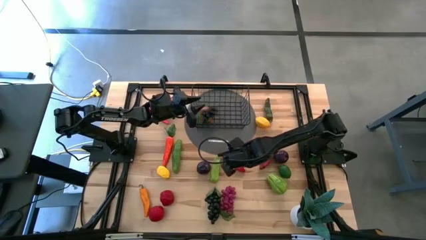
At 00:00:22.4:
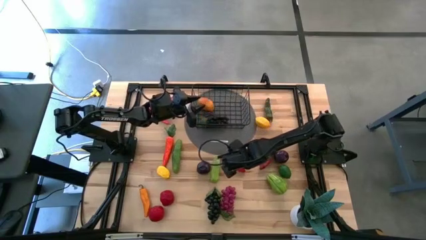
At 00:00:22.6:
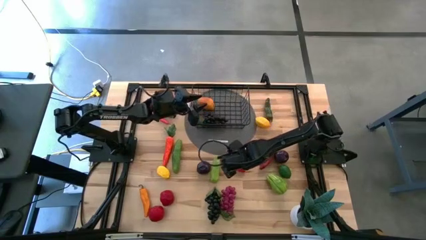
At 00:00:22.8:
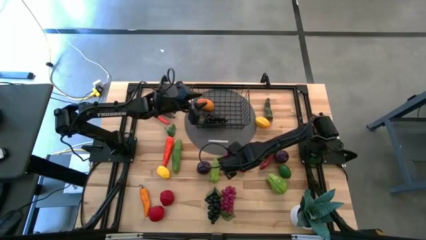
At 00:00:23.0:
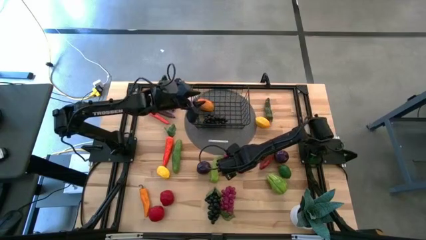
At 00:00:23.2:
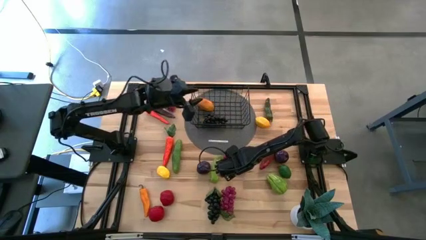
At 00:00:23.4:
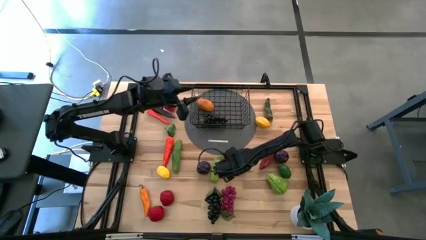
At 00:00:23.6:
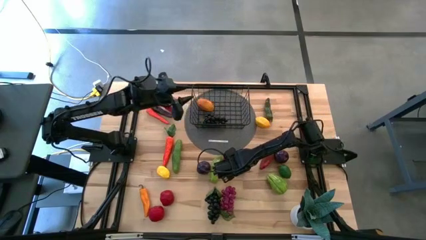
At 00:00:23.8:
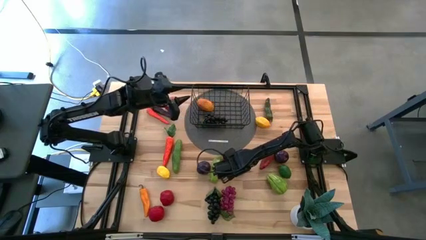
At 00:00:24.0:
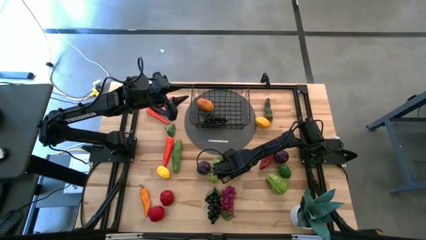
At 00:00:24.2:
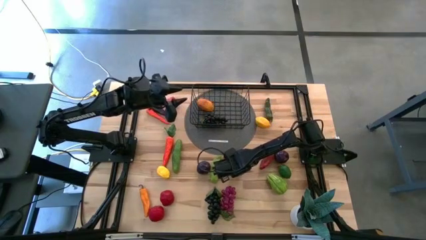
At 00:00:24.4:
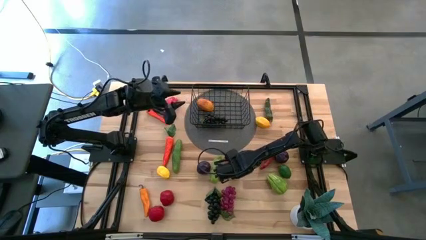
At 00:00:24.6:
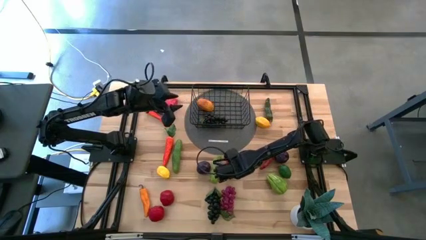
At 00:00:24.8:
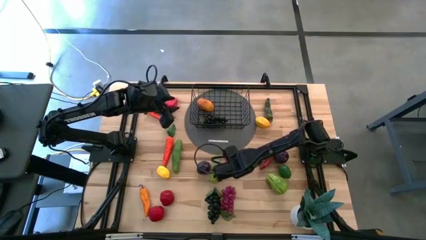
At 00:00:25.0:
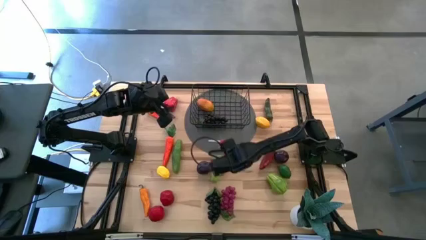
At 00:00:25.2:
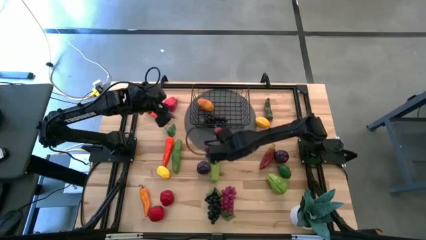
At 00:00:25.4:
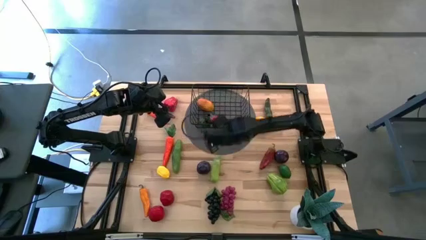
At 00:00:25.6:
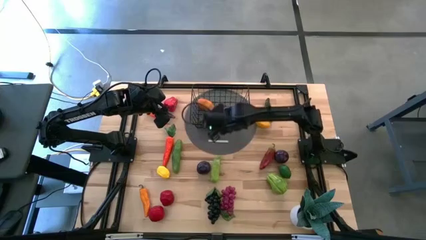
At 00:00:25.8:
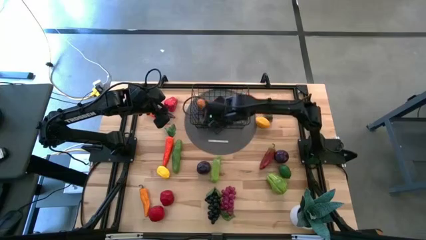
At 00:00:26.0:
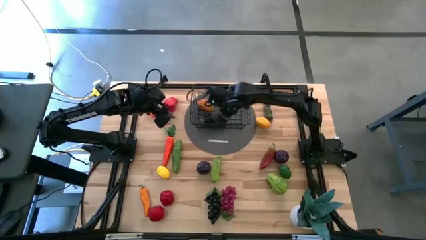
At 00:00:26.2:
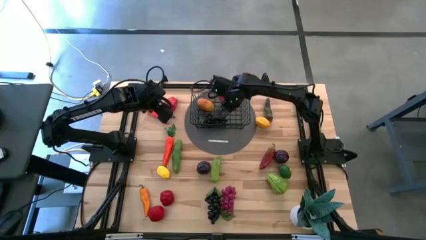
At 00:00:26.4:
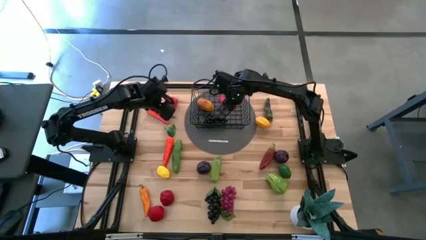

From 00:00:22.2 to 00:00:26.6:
Task: Build produce basket
Put the red chili pepper into the black wire basket

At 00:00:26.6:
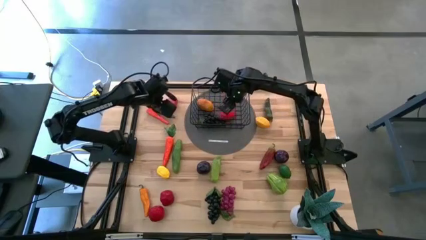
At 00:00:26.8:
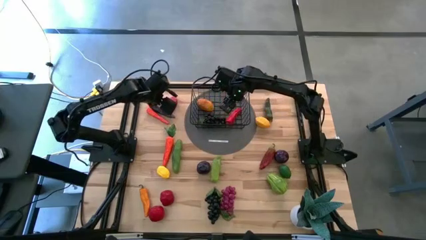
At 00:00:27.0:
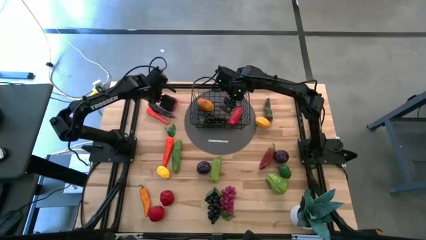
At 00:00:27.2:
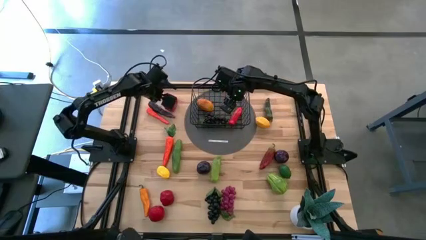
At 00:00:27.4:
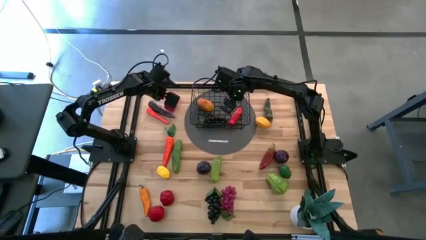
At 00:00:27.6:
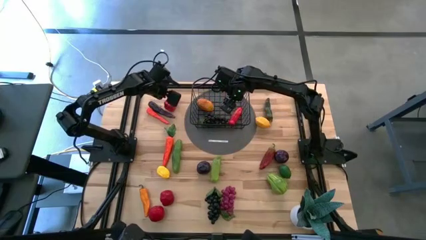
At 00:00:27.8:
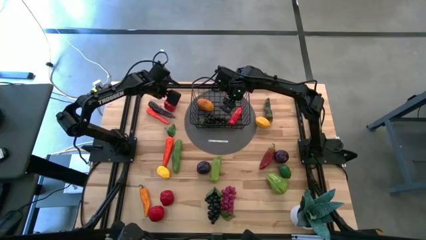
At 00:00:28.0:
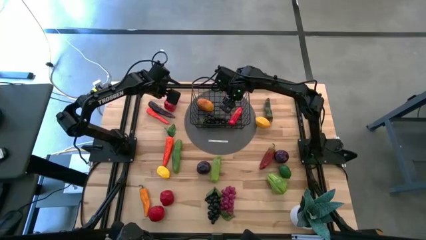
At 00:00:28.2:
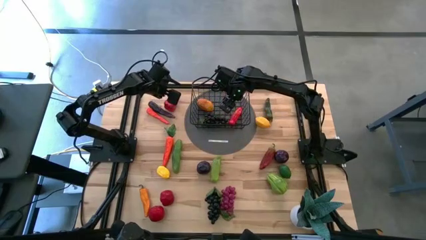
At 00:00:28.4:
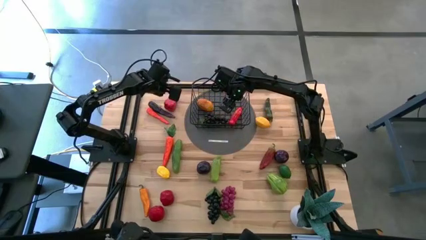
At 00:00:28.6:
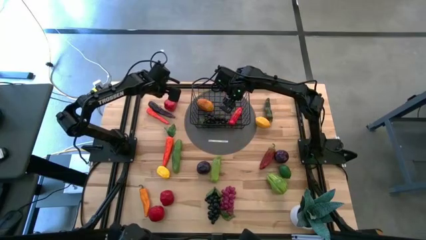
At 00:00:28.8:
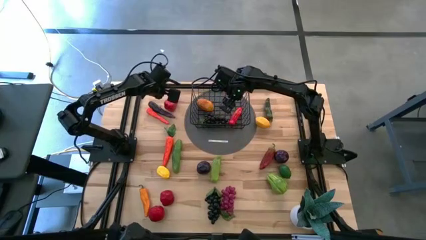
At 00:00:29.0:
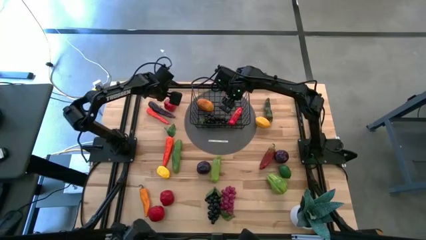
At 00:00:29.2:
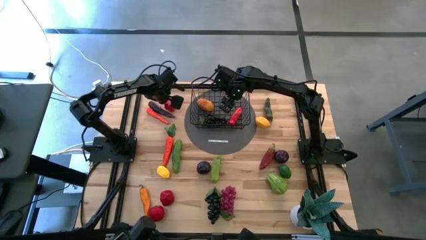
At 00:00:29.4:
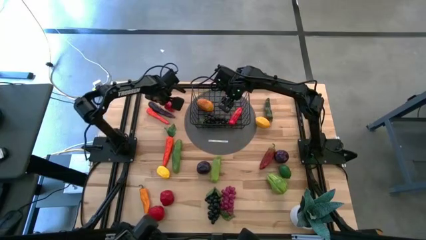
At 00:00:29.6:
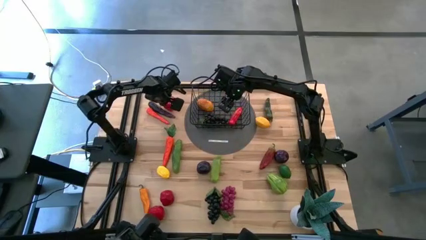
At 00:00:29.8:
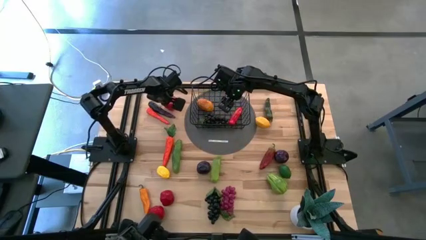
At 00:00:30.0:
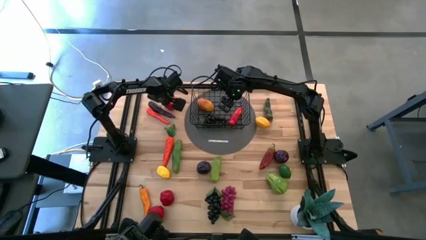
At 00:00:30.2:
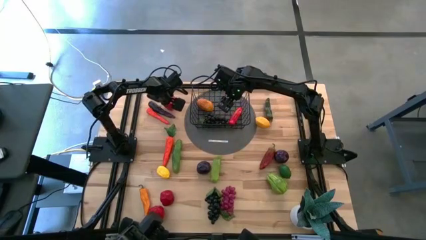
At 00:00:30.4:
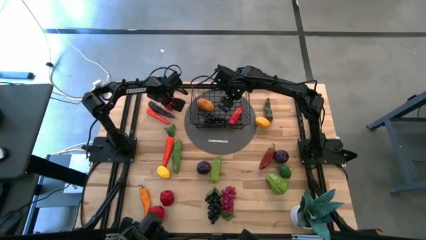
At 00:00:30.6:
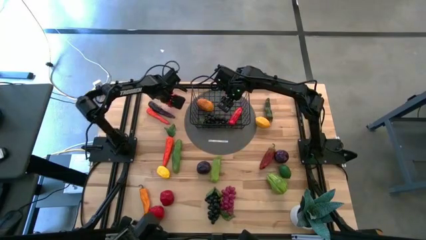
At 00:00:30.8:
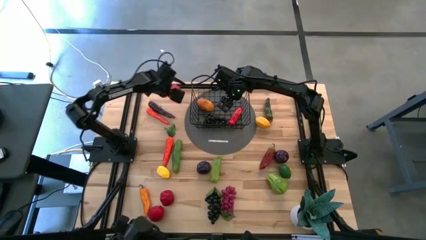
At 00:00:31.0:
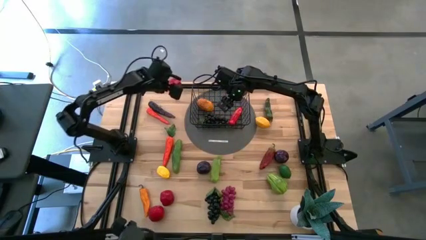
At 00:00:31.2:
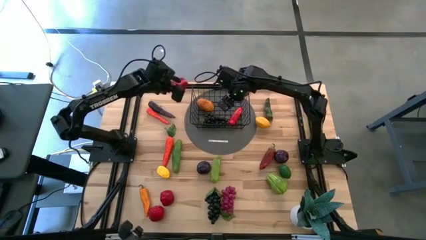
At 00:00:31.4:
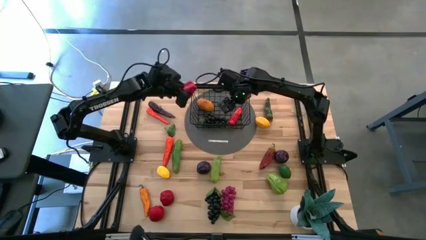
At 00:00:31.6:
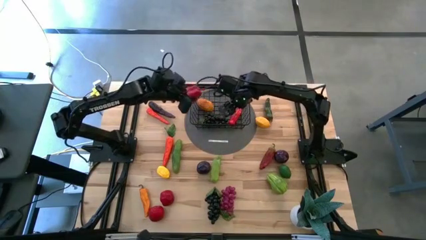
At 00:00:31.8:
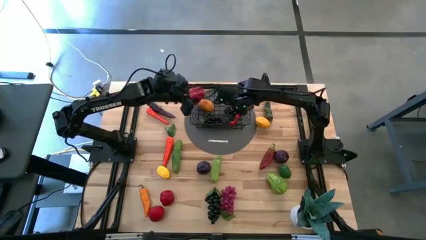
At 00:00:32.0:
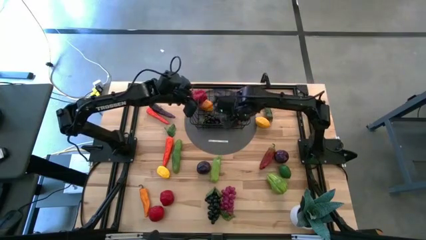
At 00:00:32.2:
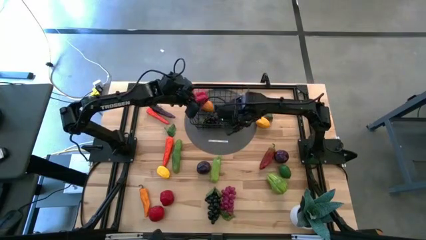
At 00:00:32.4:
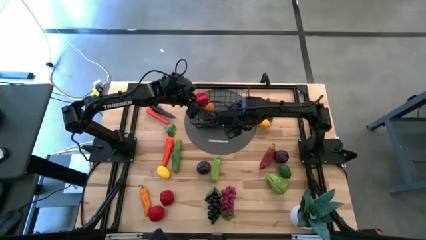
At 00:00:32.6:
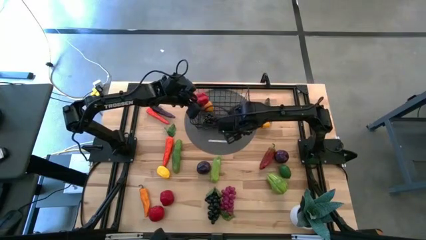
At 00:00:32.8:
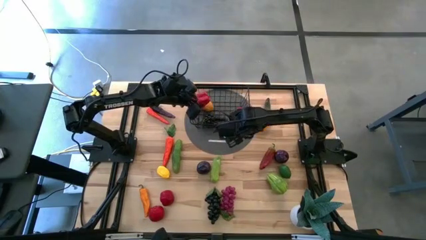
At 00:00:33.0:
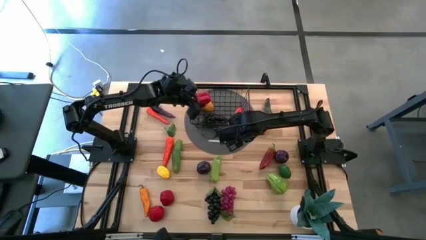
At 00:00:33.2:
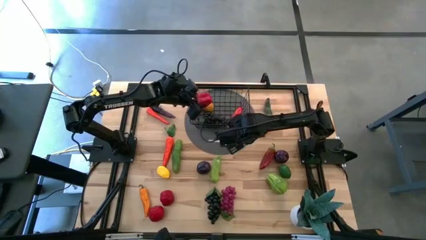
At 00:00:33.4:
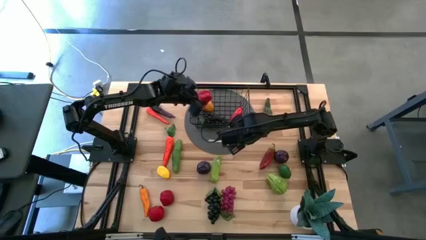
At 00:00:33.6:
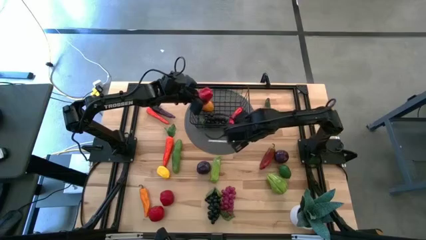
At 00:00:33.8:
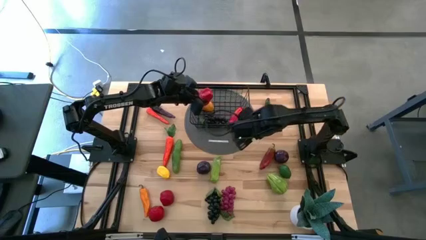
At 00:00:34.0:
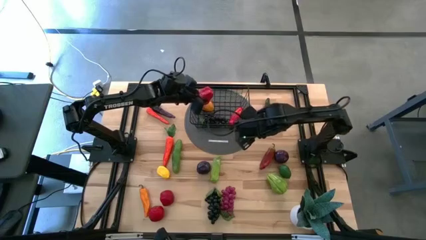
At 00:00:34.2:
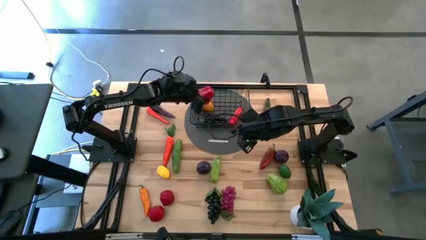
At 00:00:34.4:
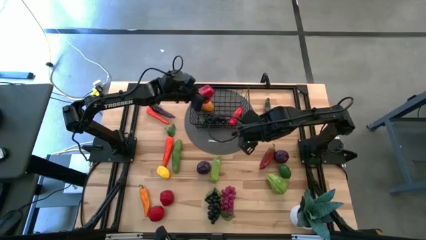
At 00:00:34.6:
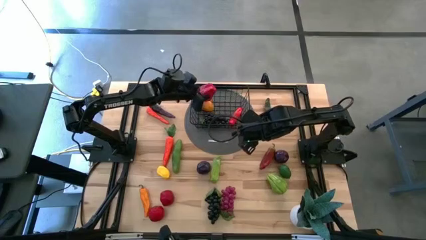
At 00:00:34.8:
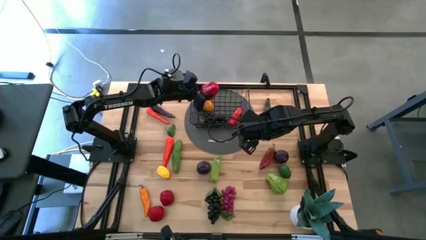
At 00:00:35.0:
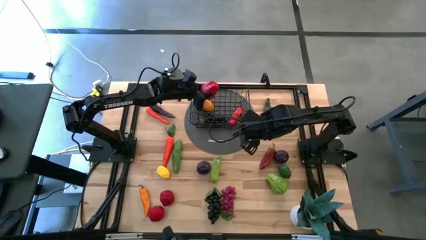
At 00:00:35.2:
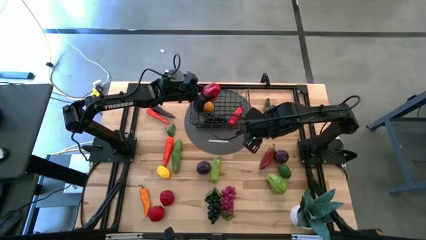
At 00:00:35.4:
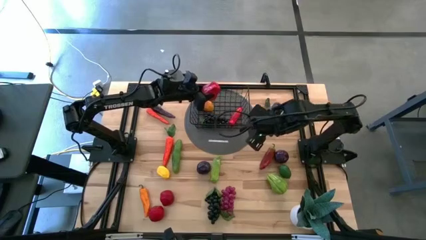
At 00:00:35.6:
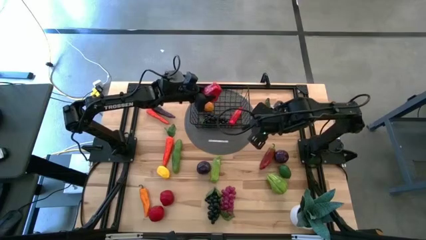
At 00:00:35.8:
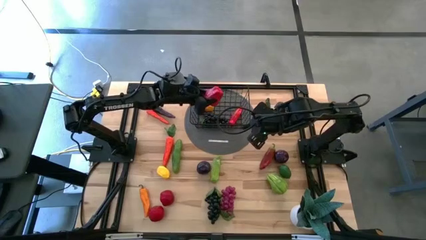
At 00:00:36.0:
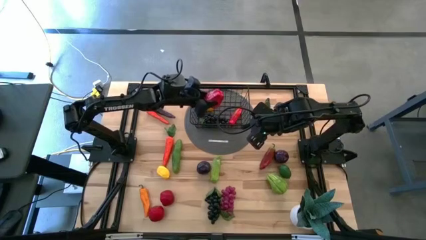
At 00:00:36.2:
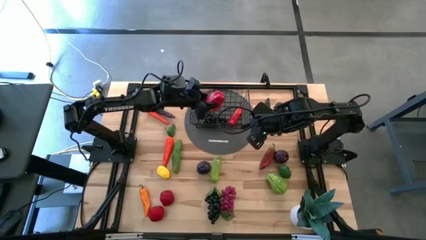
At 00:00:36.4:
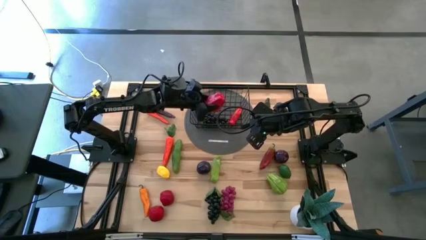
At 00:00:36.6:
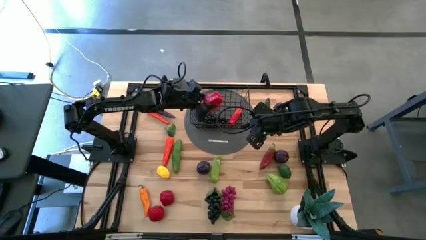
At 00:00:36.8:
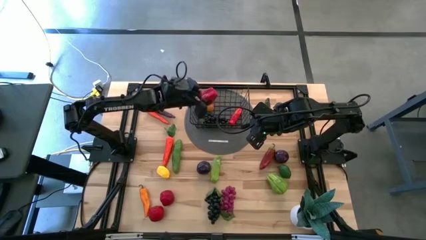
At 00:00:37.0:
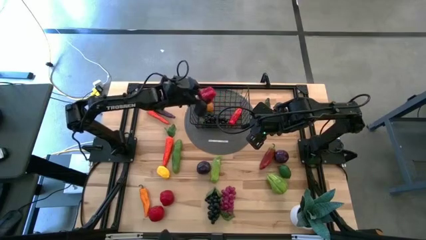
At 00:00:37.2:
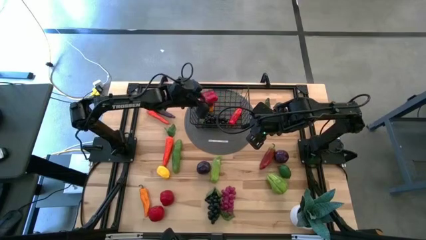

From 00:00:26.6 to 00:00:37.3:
Put the red bell pepper into the black wire basket
